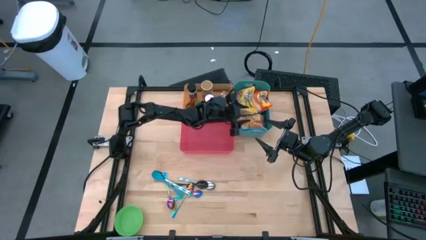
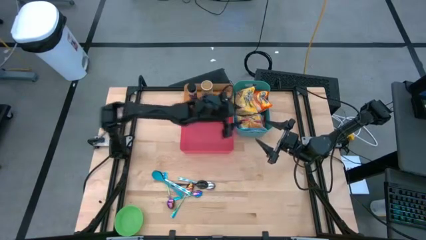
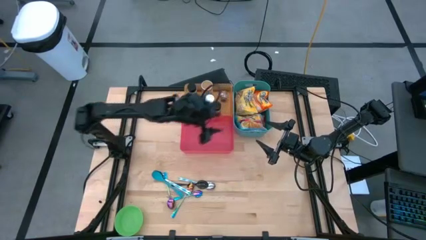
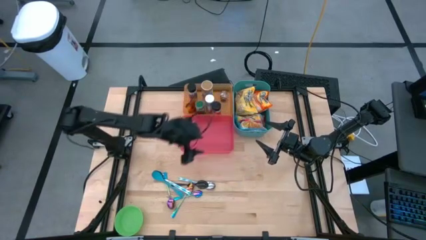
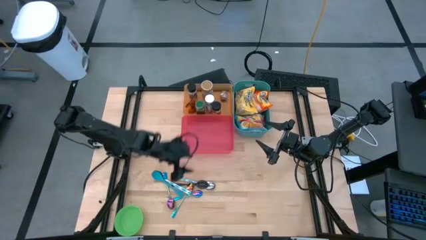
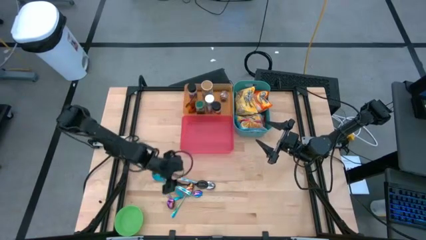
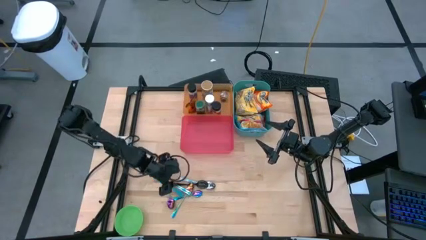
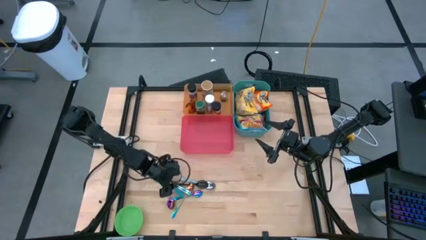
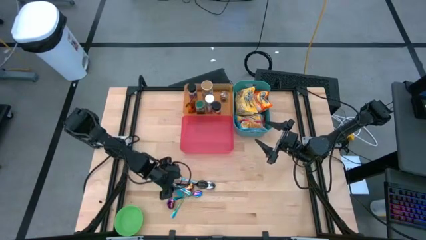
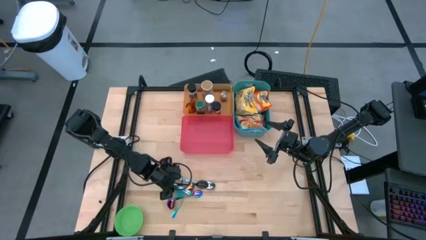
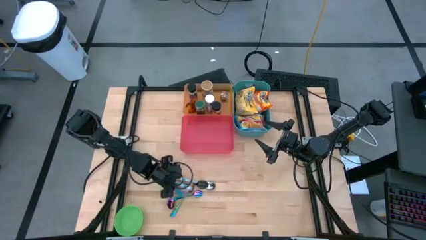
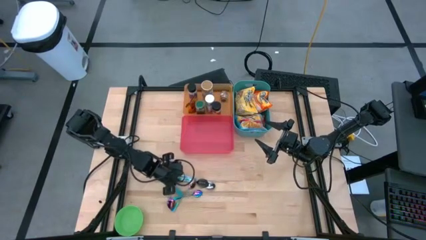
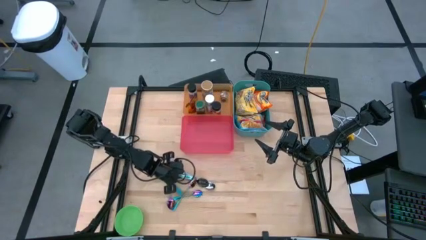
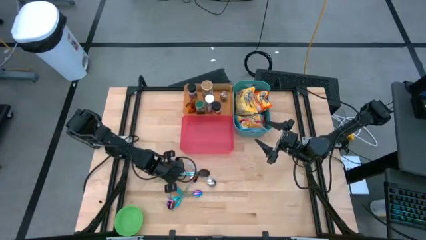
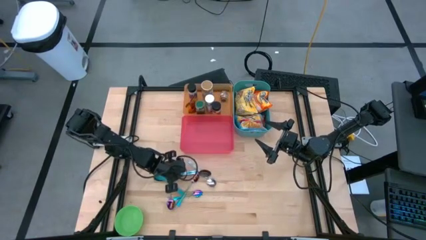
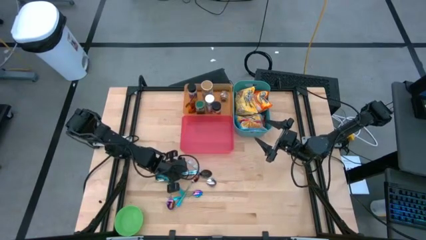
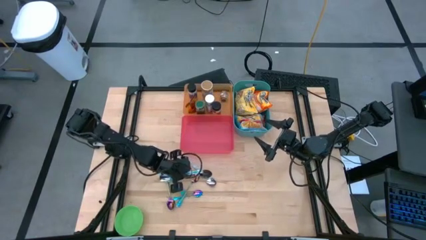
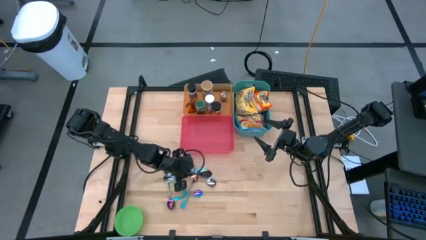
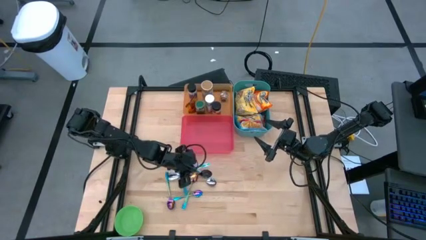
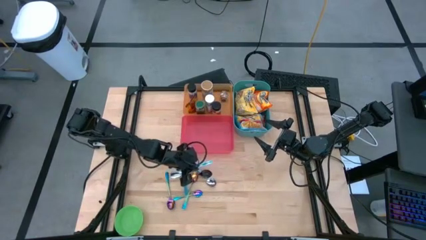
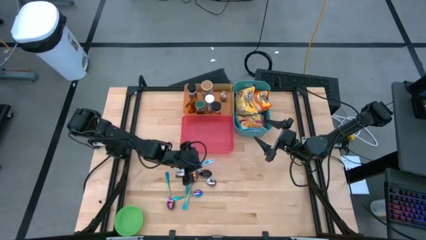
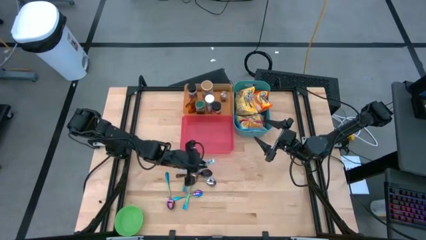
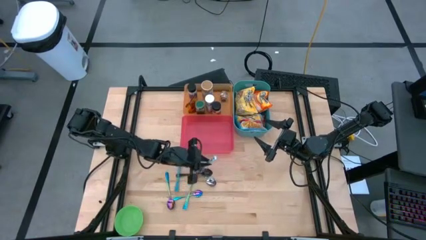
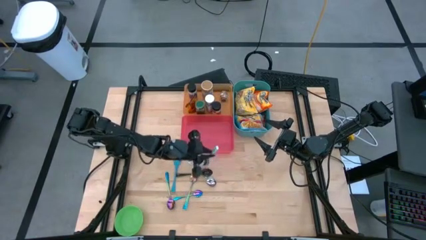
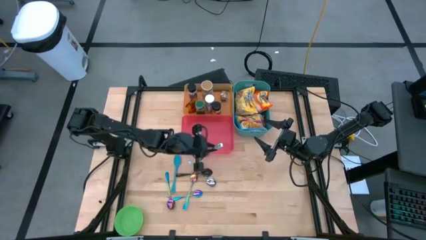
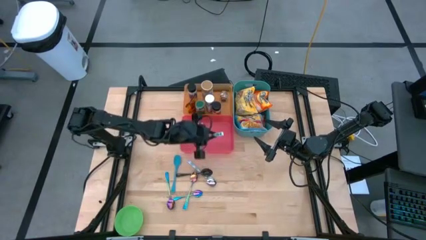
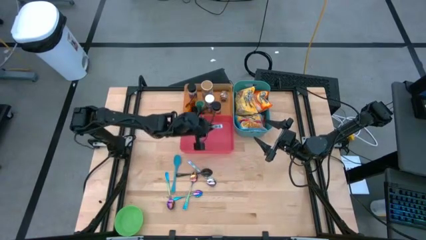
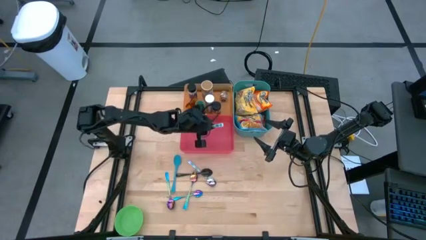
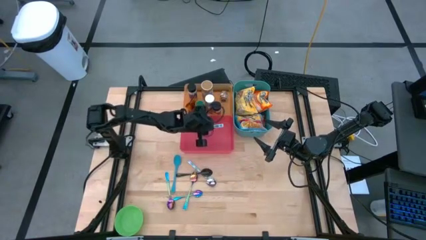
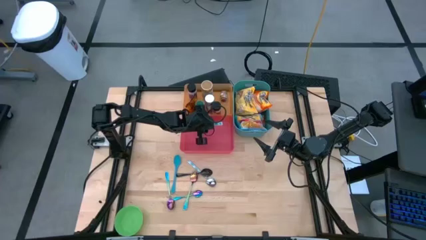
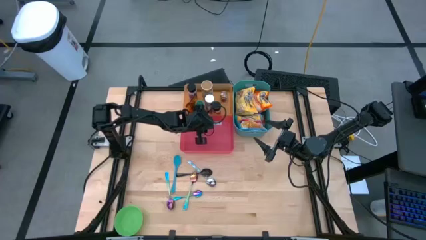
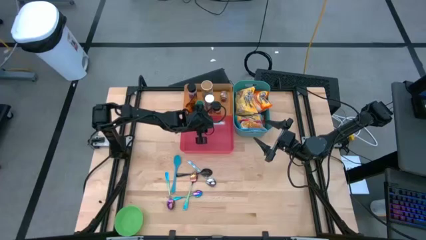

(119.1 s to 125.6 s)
Task: Pick & Place Food Item
Put the bottom blue patterned spoon into the red bin

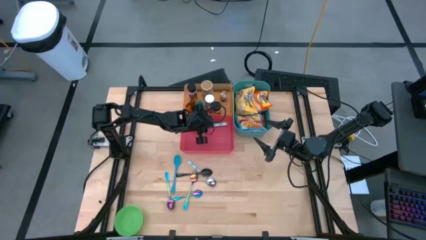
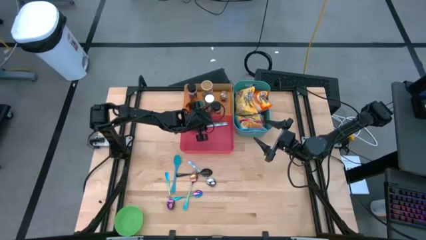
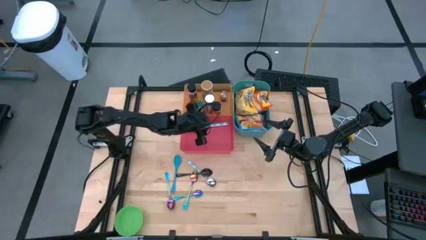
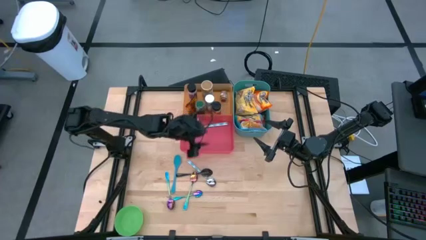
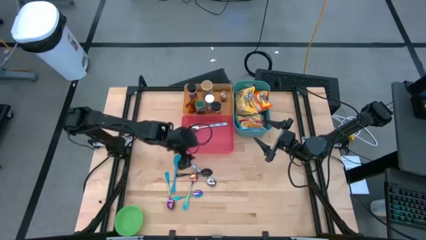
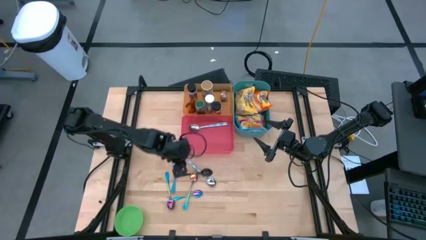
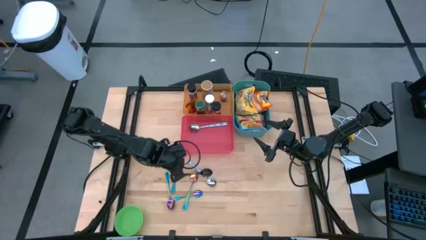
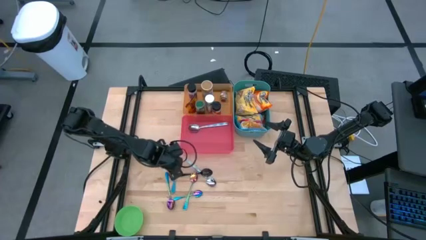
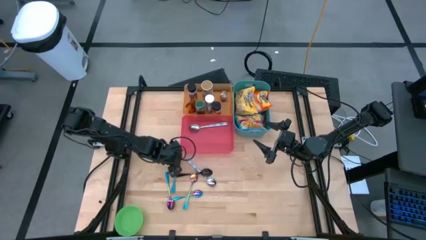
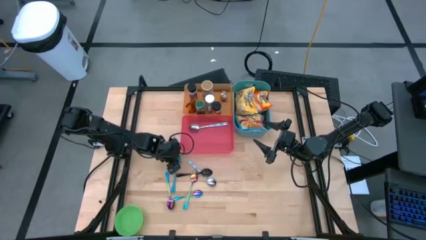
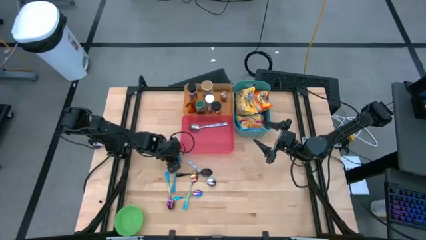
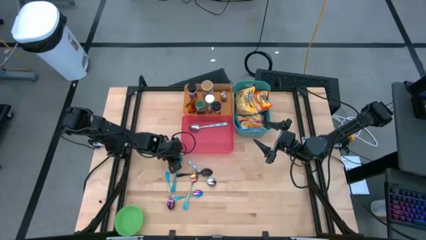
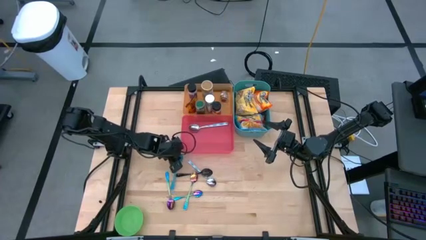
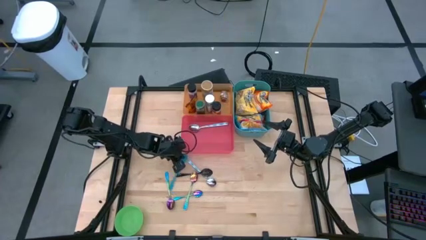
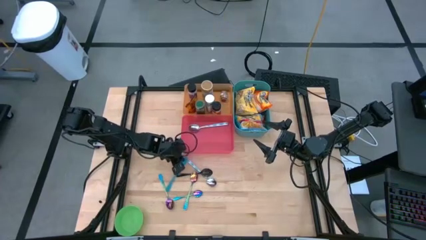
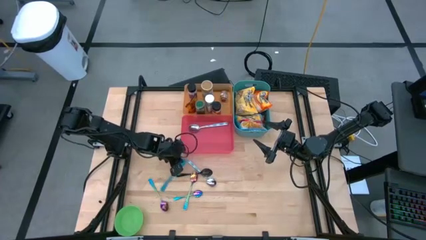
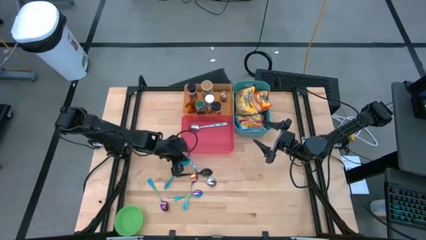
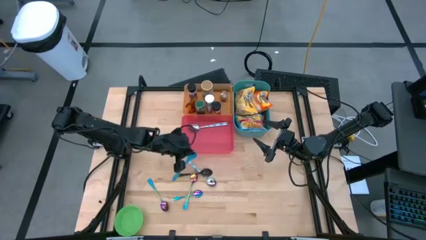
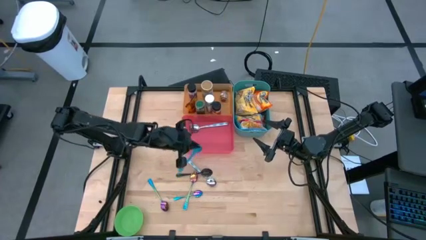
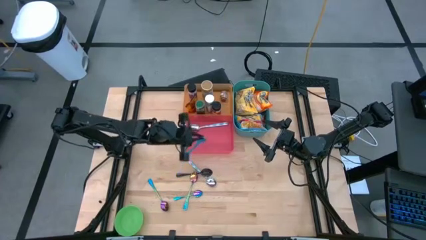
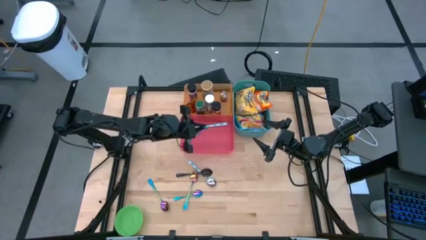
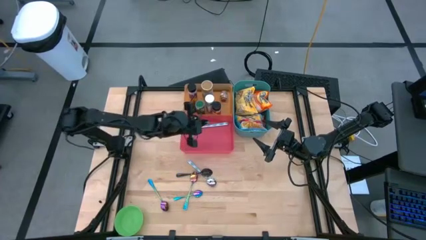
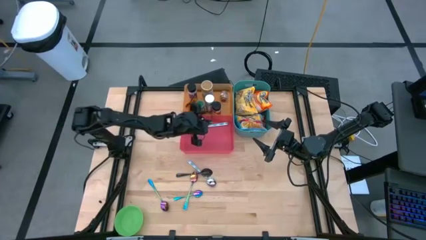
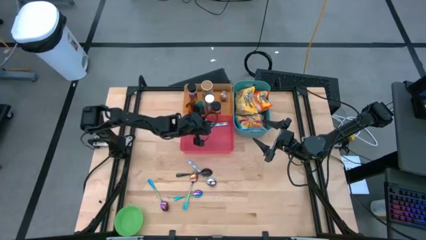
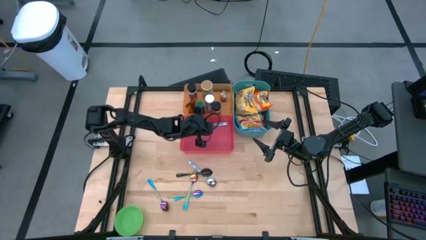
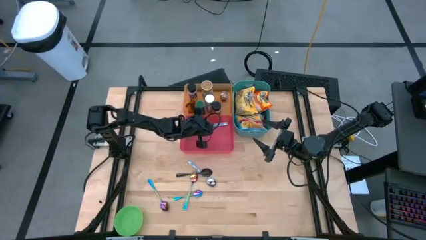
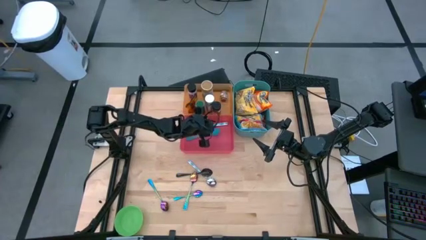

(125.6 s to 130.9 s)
Put the blue baby spoon into the red bin

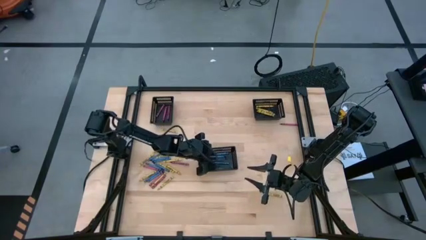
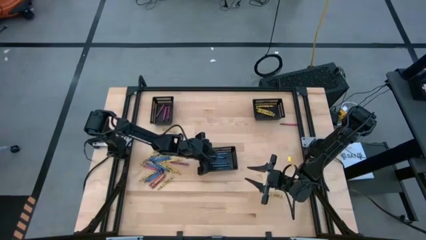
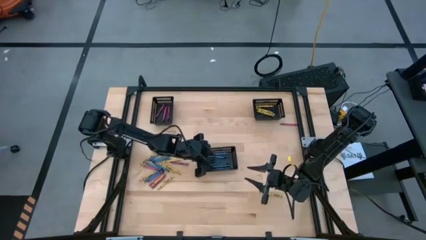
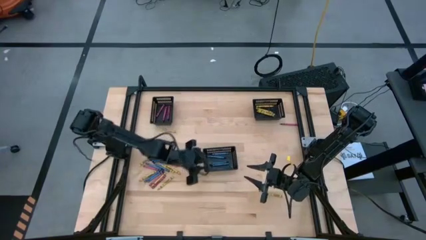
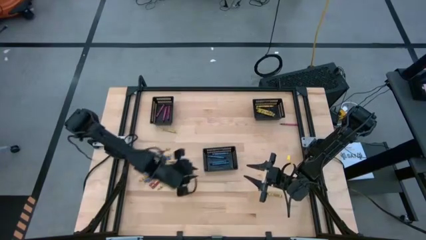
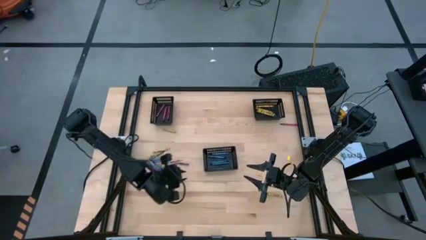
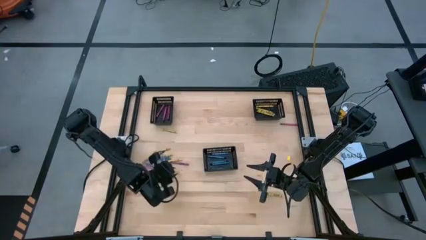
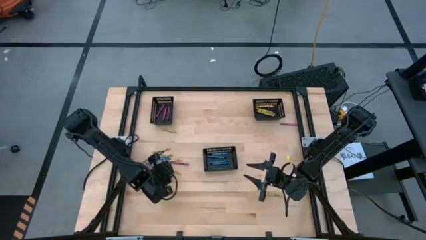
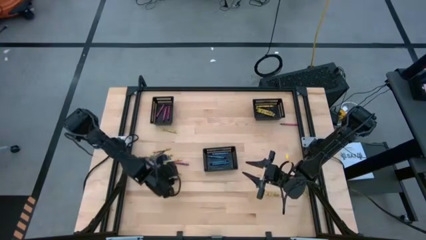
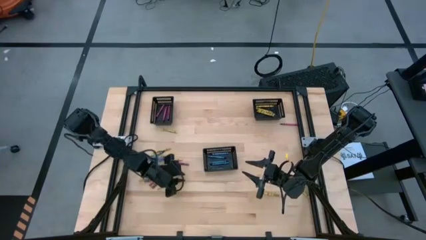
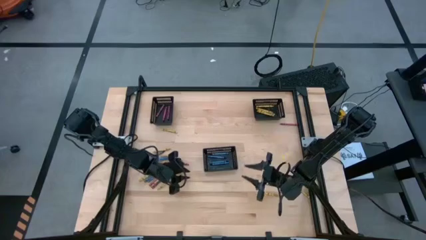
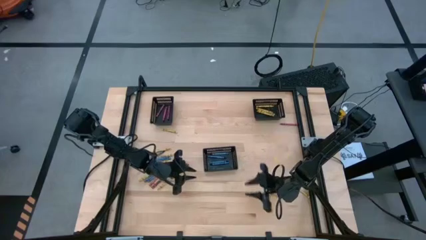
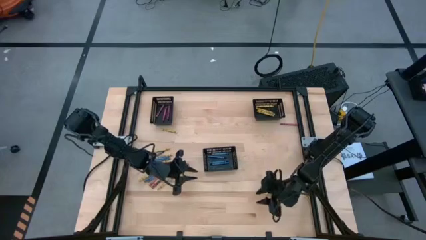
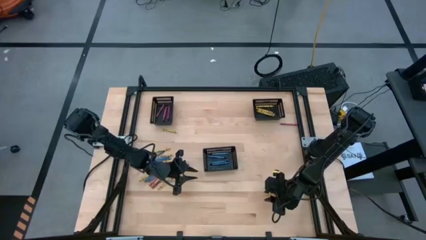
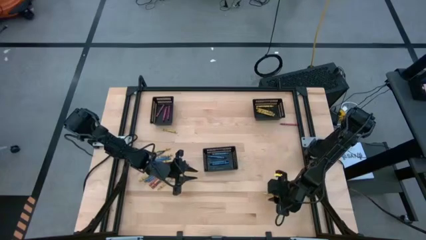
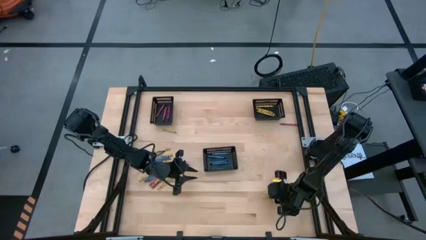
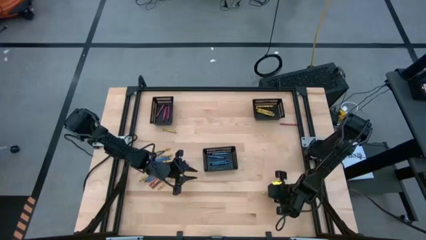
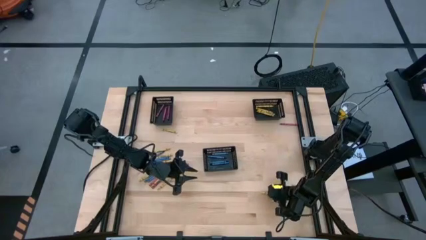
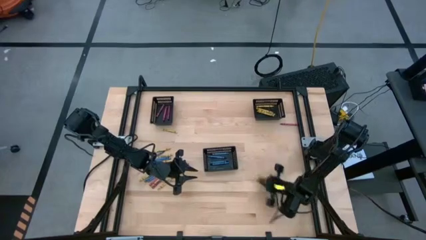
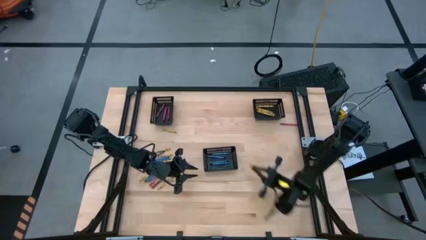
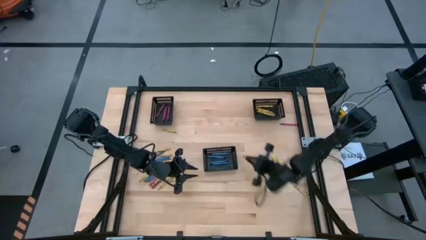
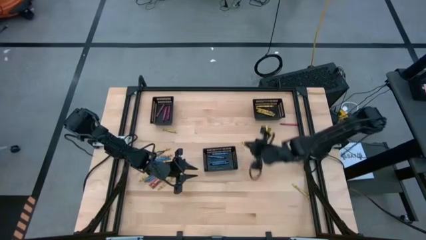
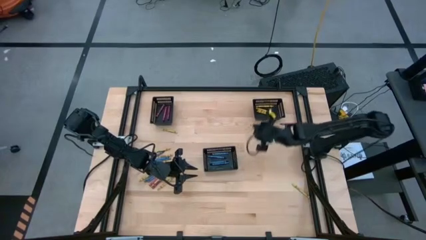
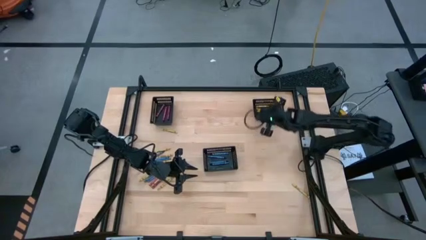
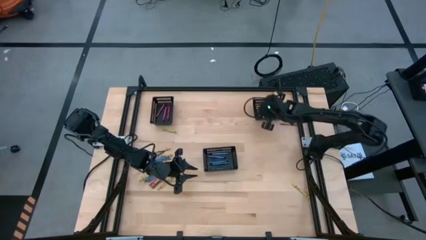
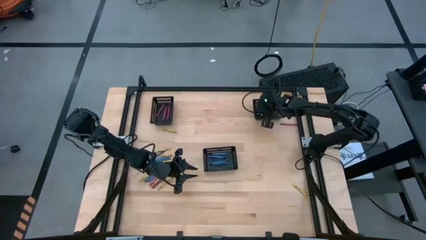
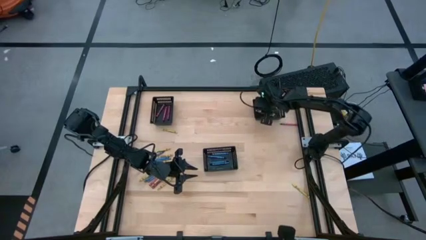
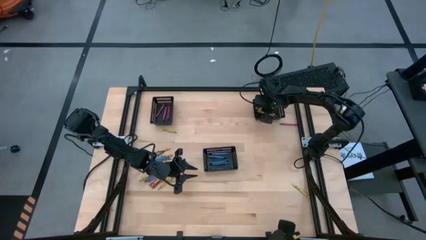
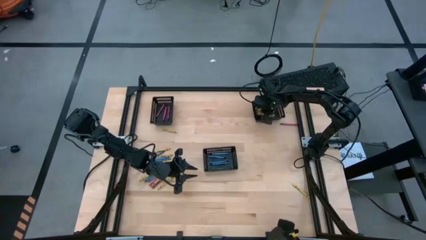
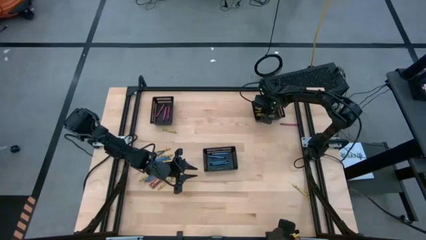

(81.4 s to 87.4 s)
Task: Sort crayons
Put the yellow crayon into the top right black bin
